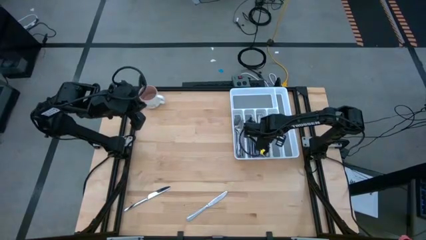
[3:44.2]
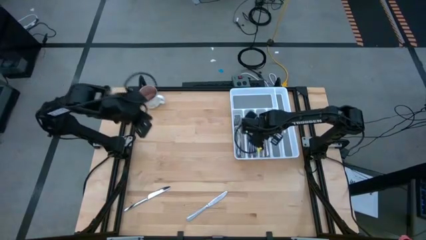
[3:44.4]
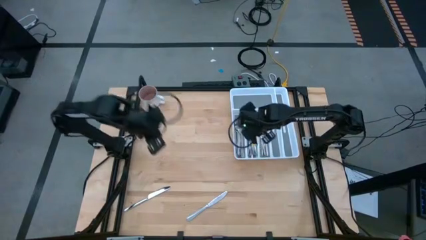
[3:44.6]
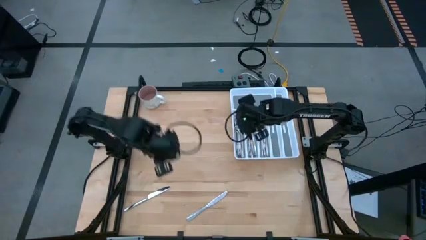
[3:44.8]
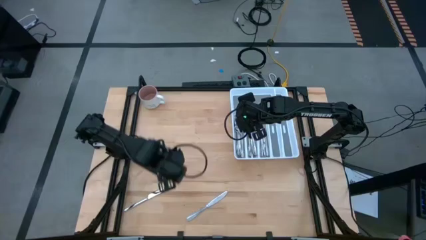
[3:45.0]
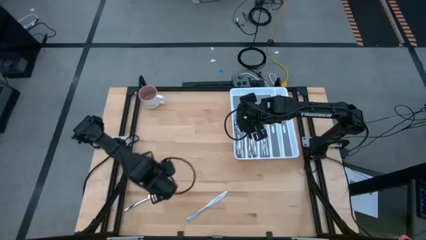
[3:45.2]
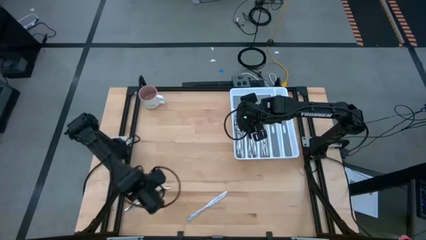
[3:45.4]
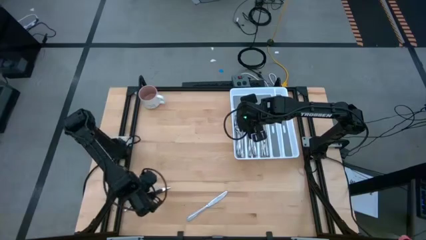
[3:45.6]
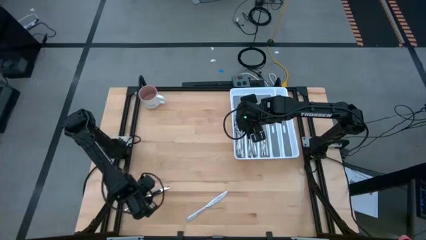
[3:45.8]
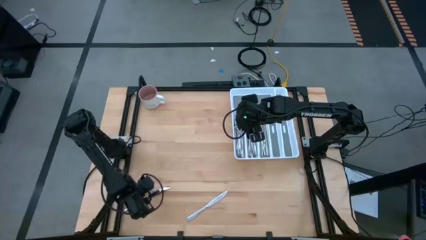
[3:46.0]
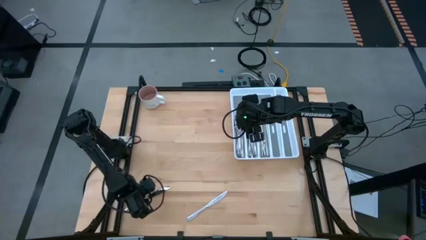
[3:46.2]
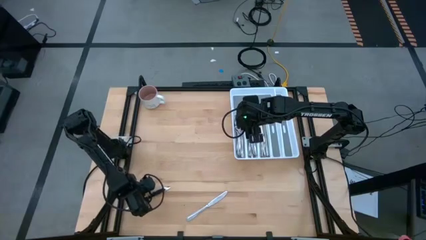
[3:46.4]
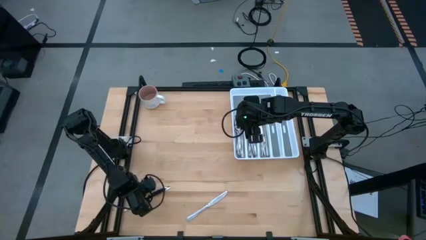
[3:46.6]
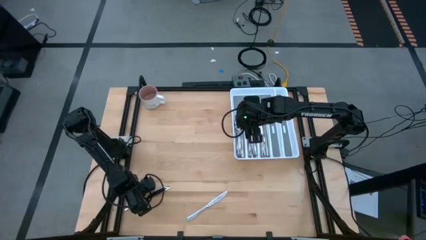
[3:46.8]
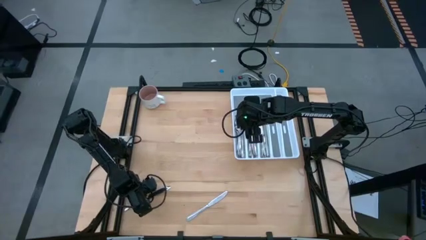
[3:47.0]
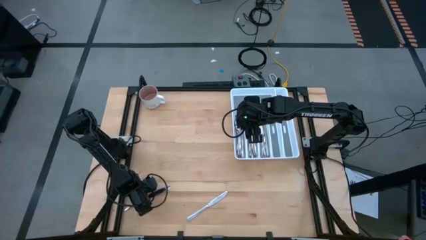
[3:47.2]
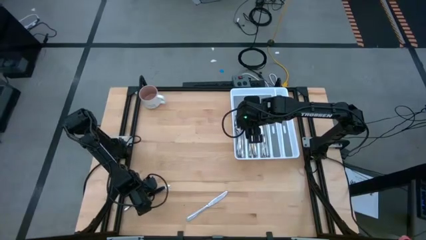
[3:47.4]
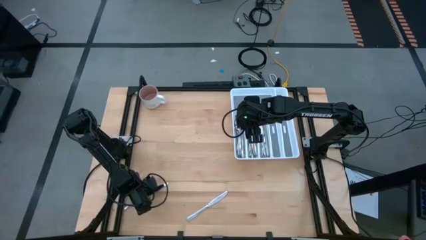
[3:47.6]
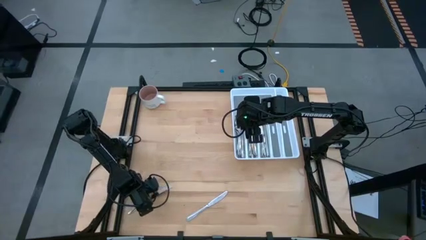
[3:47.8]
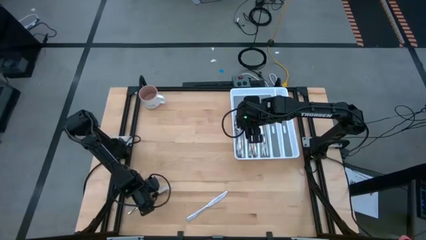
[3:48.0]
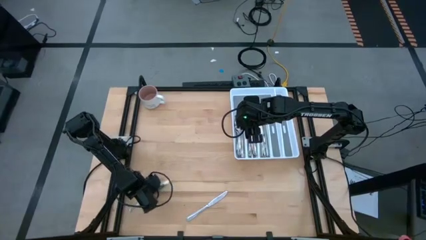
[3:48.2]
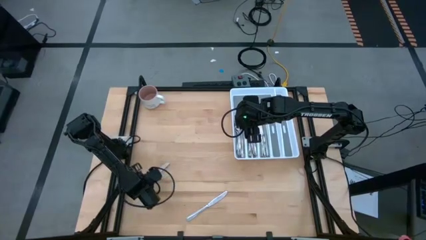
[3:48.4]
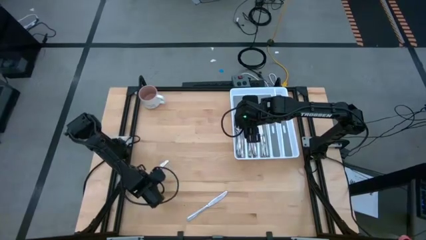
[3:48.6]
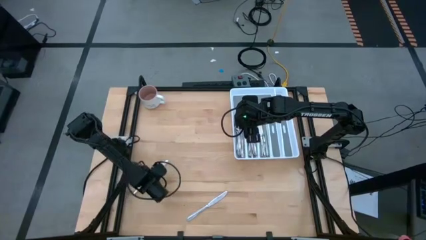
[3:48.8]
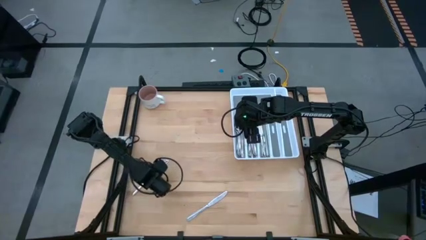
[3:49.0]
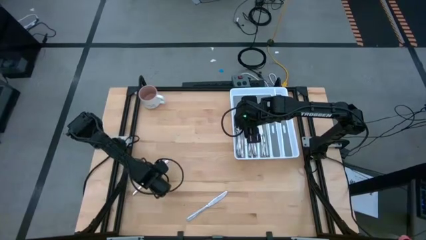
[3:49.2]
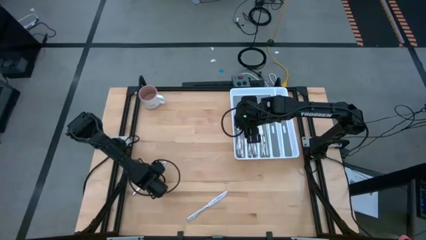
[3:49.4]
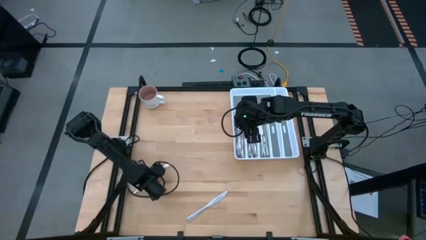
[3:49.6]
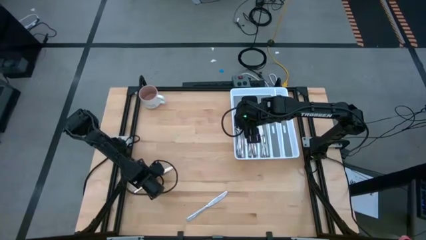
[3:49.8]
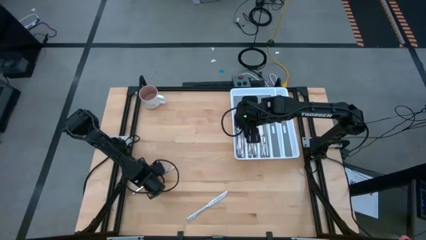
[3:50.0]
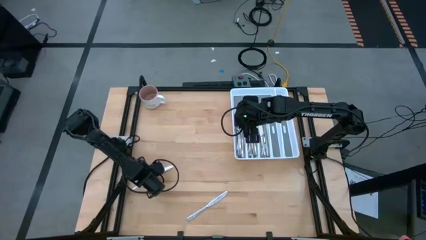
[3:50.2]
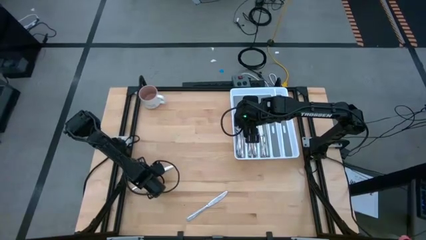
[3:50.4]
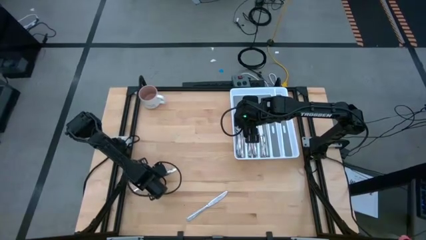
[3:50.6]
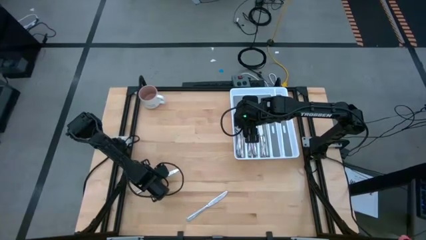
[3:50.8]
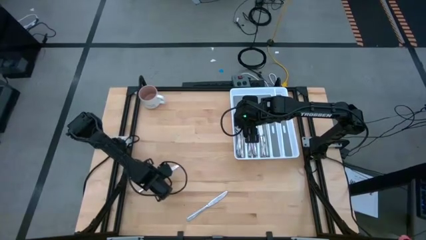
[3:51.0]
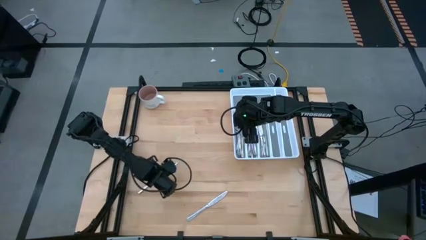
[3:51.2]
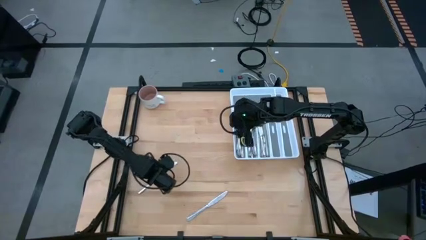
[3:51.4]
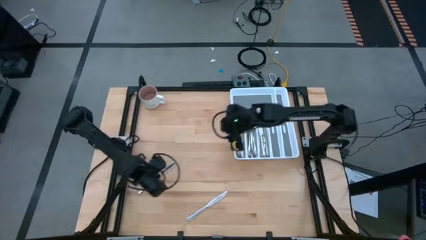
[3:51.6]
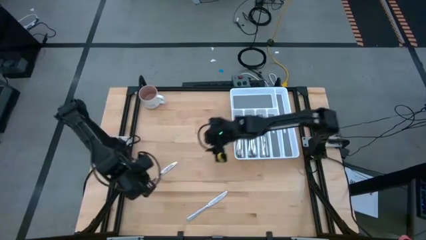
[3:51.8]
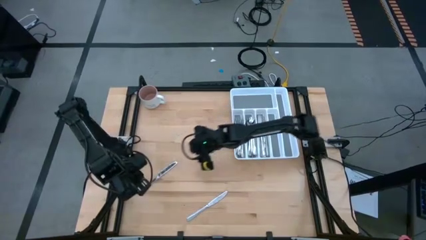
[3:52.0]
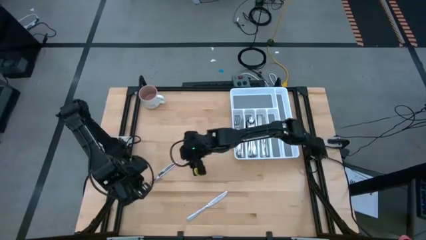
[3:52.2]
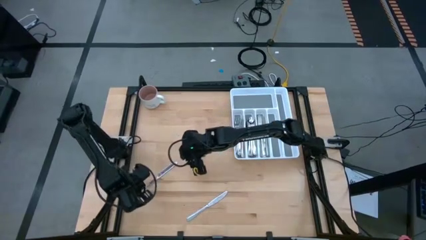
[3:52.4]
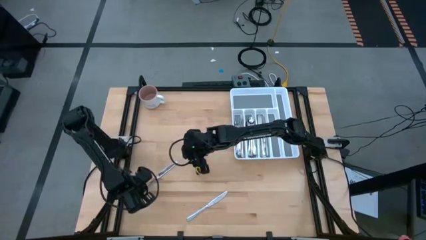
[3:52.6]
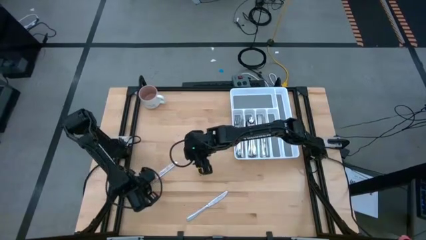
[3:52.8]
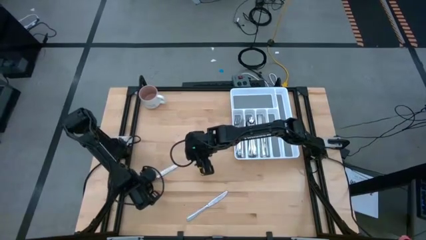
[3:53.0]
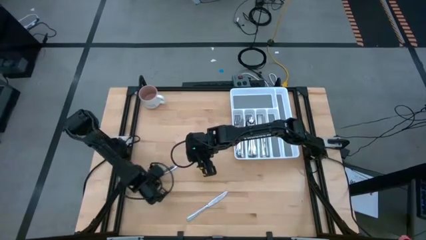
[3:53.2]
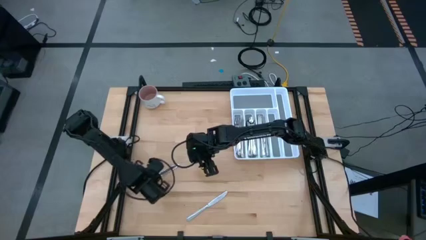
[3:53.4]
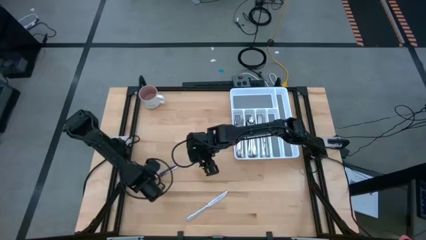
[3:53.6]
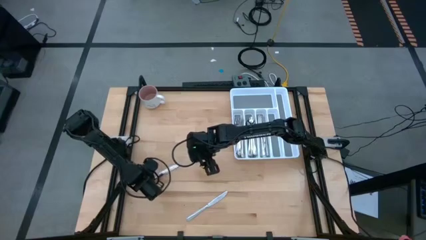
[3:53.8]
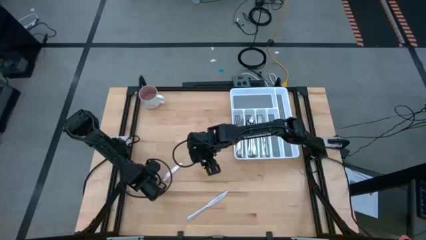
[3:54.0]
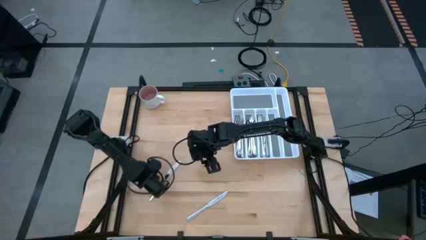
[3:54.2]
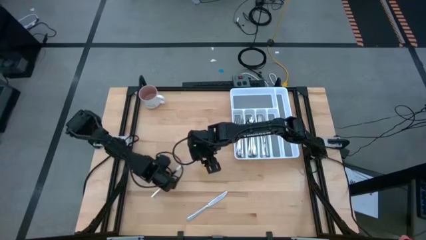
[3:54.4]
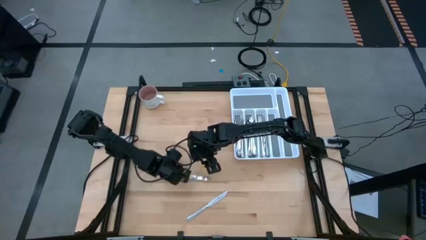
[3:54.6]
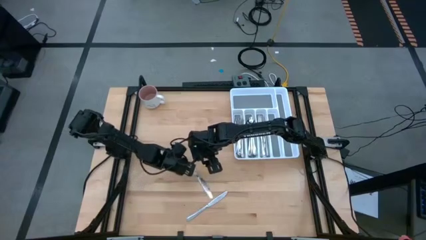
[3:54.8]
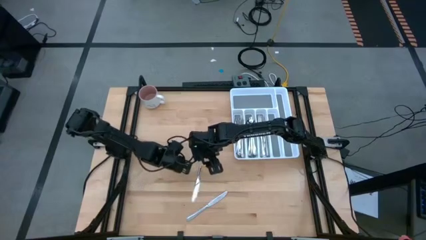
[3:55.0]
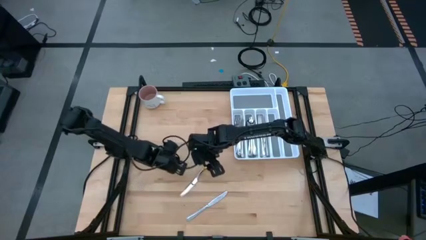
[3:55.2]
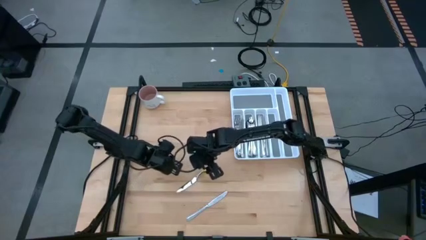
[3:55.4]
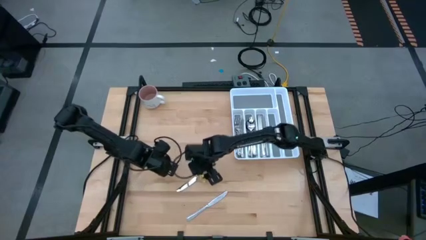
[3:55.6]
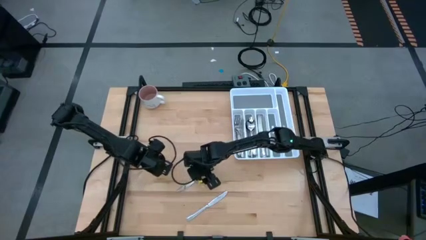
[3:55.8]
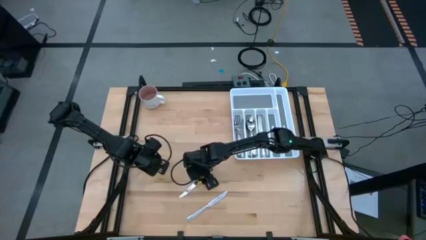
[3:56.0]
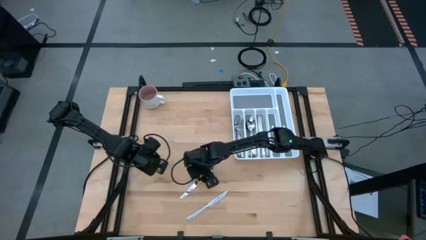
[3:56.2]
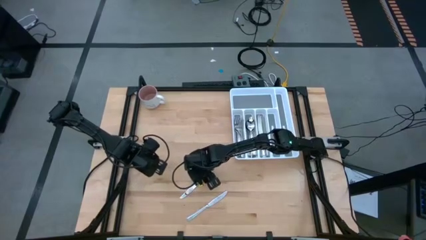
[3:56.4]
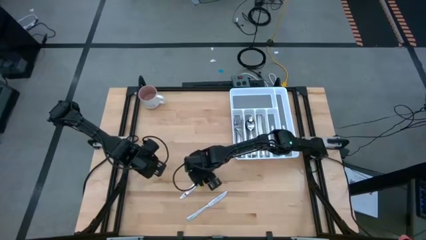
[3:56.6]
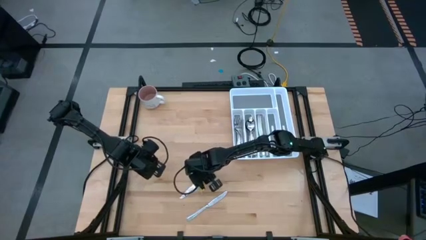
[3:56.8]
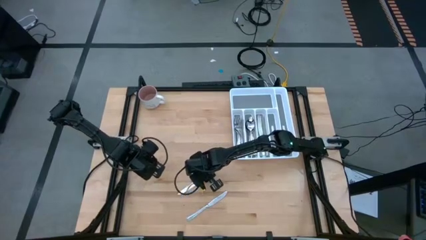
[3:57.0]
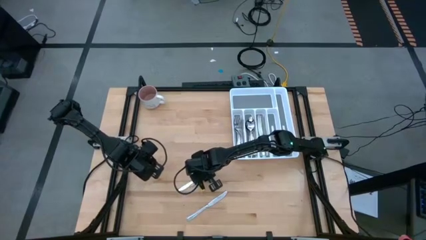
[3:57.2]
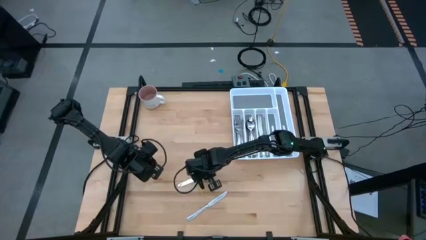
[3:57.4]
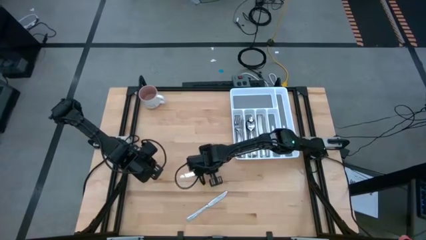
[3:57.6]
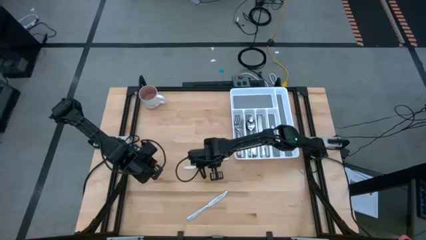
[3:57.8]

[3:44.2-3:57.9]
Task: Sort silverware
Put the silver table knife into the silverware tray

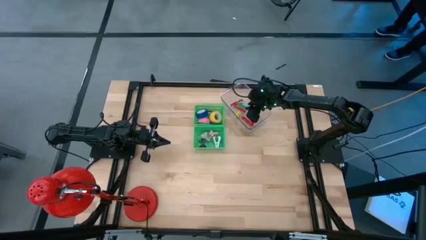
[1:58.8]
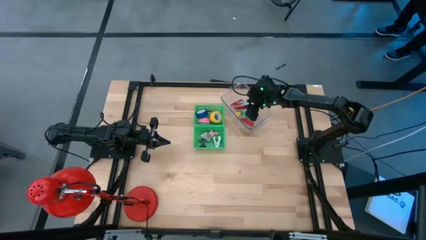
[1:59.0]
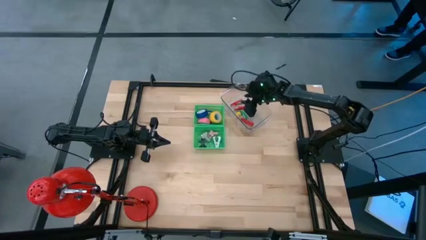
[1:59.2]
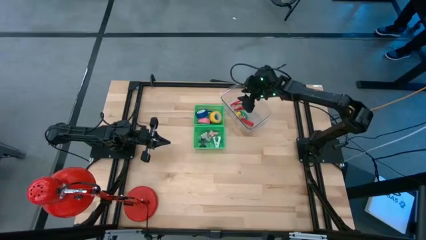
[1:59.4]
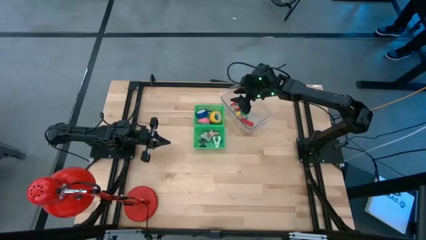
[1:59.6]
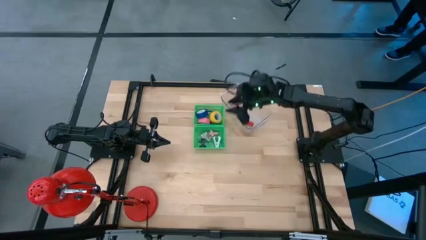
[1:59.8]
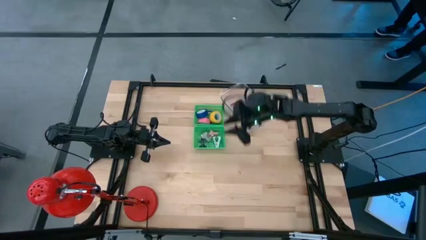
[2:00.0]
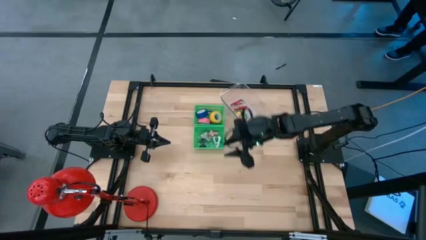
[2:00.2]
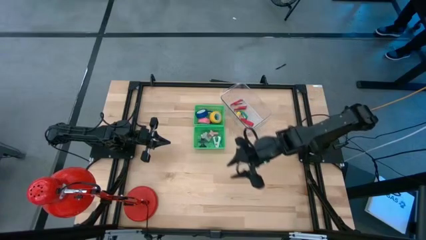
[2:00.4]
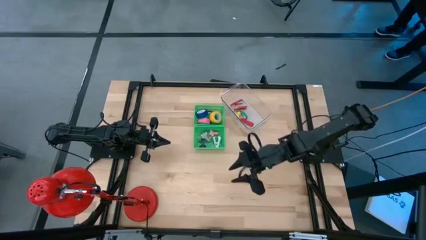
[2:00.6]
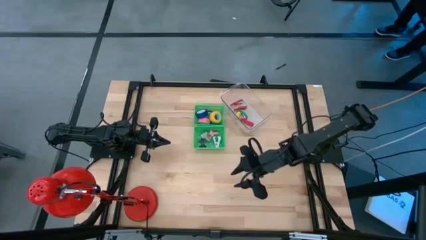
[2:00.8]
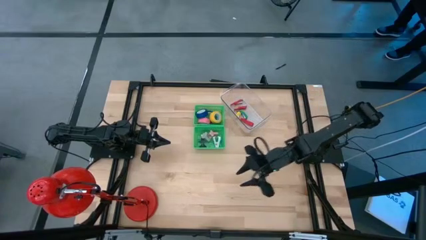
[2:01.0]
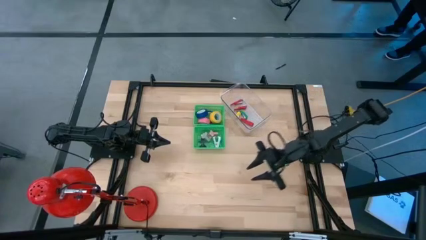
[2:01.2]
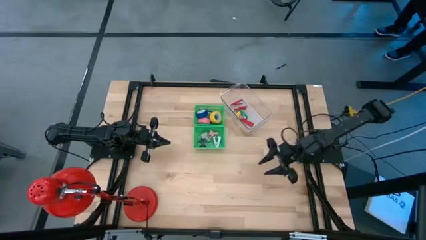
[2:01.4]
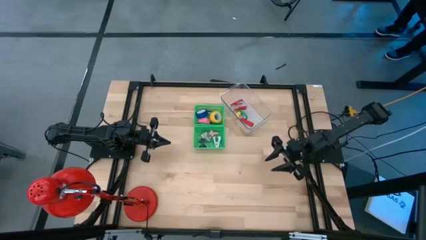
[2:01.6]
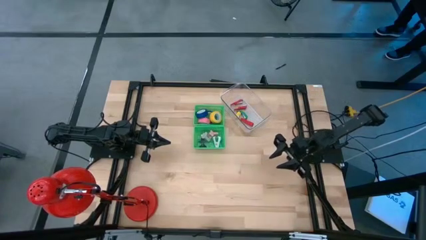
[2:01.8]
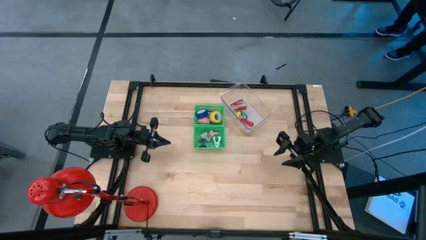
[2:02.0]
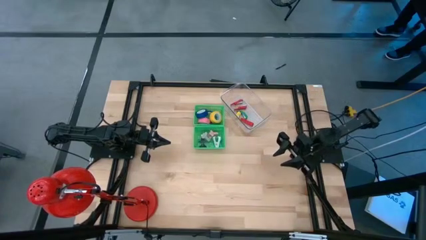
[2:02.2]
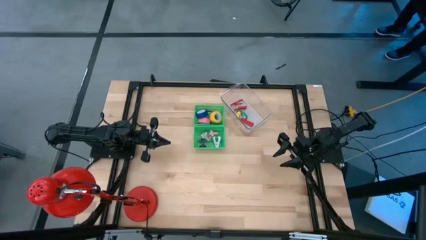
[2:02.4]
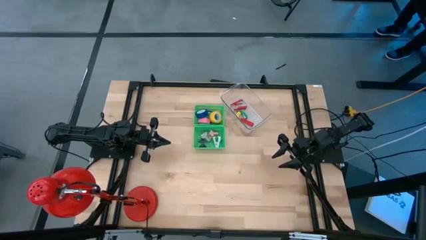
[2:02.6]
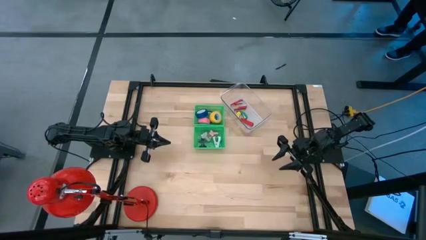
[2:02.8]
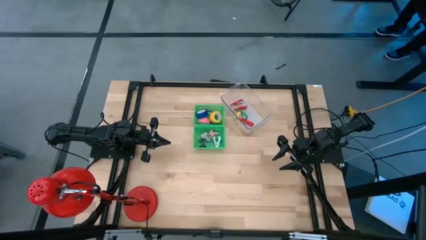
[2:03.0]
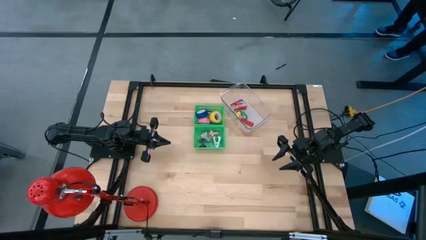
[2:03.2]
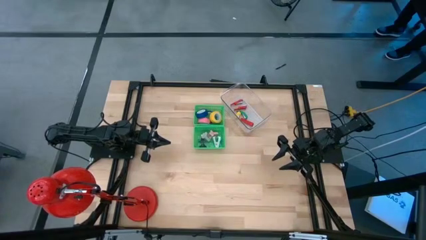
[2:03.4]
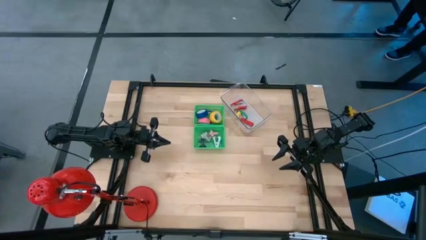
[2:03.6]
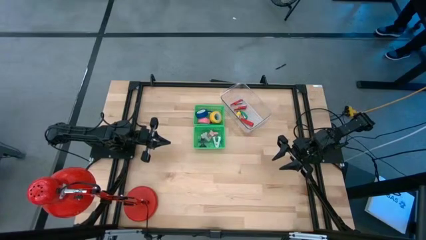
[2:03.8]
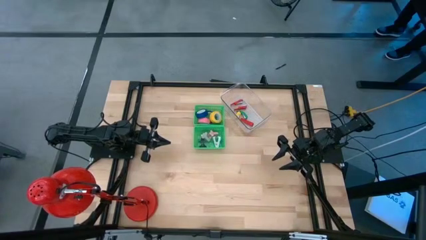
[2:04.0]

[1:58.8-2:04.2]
Task: Pick and place Stapler, Stapler remover, tape
Return to Home Position
